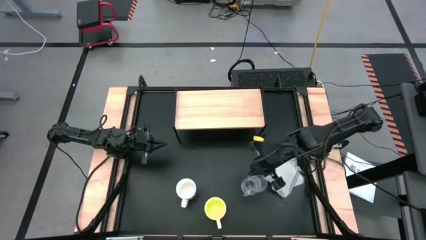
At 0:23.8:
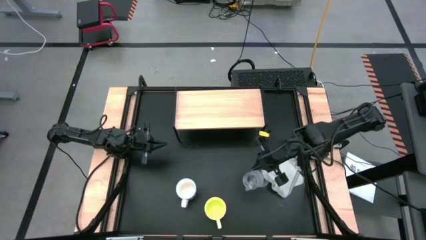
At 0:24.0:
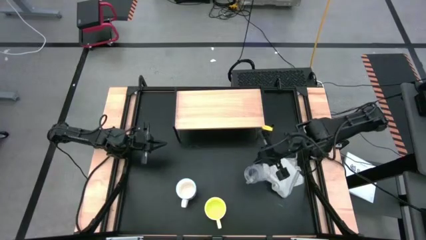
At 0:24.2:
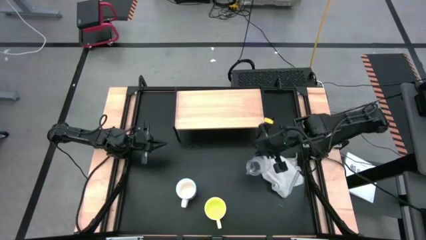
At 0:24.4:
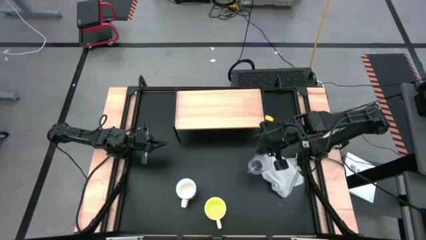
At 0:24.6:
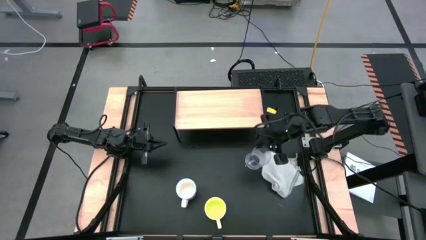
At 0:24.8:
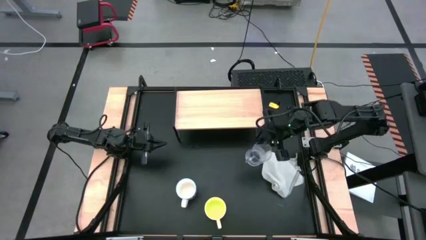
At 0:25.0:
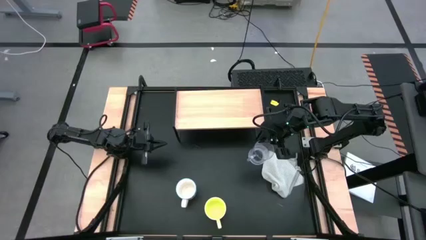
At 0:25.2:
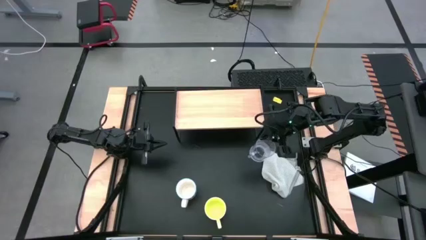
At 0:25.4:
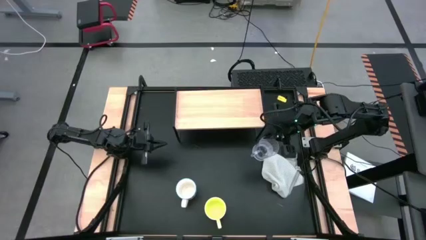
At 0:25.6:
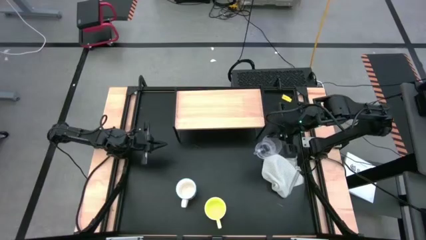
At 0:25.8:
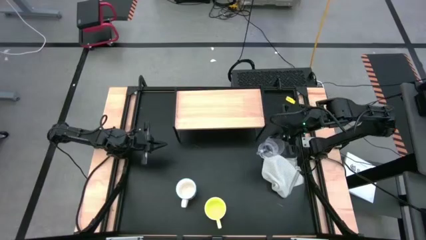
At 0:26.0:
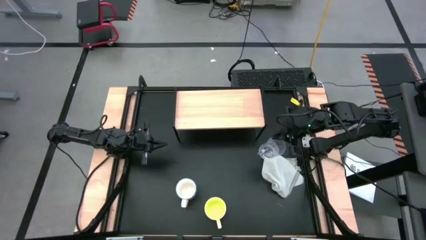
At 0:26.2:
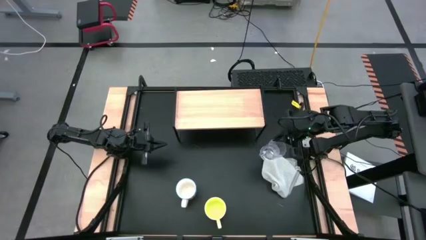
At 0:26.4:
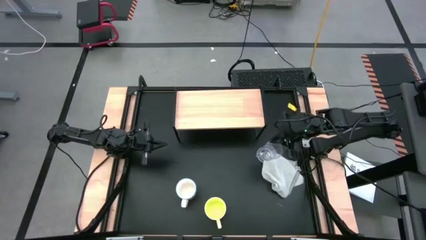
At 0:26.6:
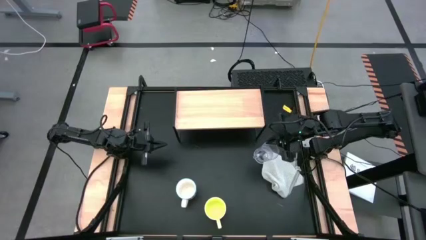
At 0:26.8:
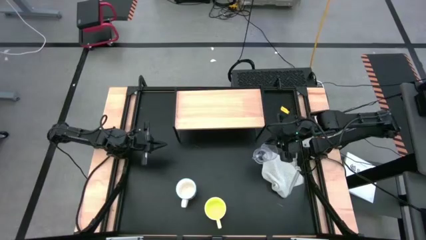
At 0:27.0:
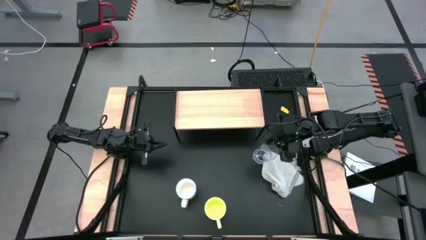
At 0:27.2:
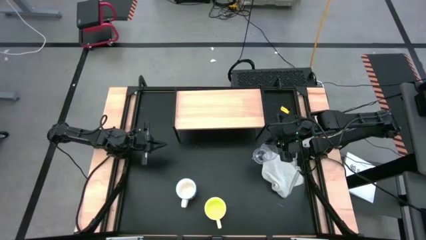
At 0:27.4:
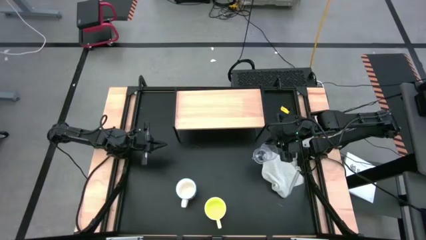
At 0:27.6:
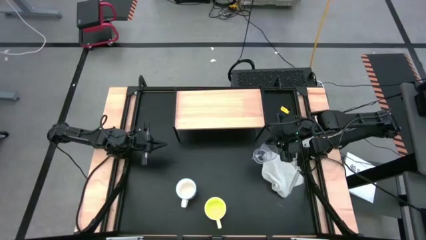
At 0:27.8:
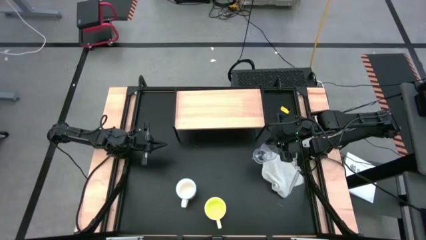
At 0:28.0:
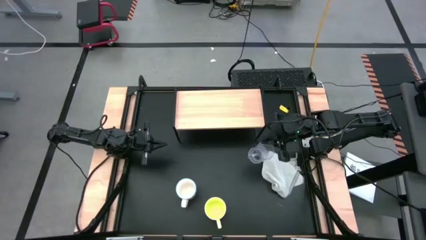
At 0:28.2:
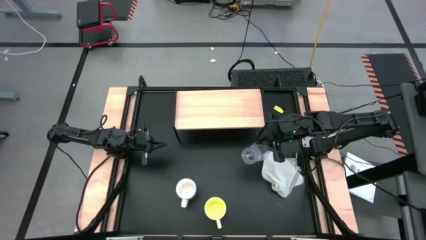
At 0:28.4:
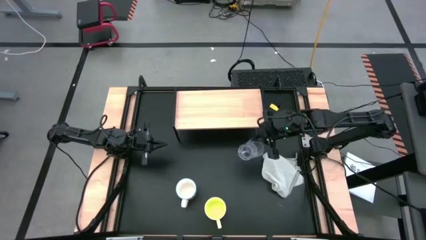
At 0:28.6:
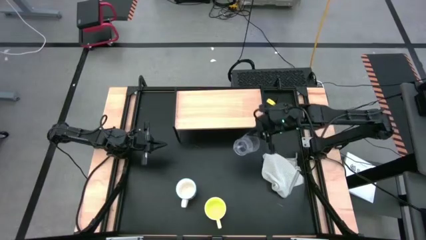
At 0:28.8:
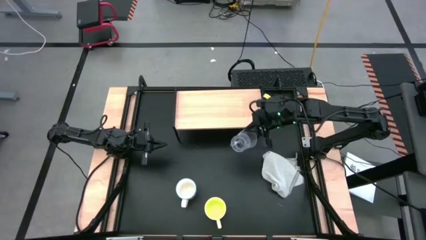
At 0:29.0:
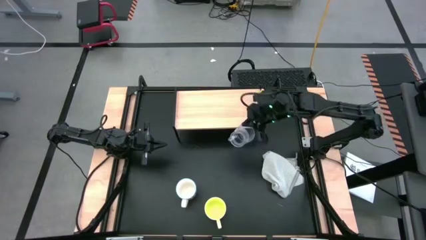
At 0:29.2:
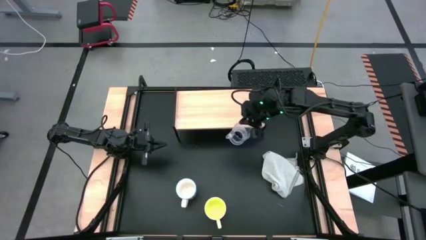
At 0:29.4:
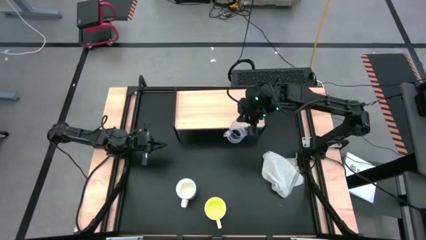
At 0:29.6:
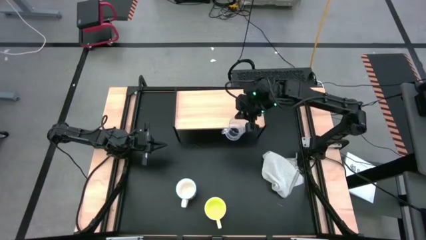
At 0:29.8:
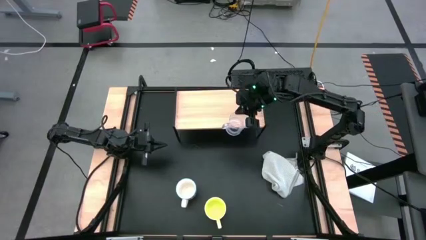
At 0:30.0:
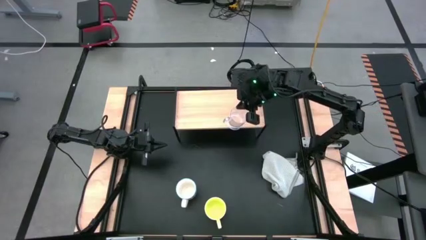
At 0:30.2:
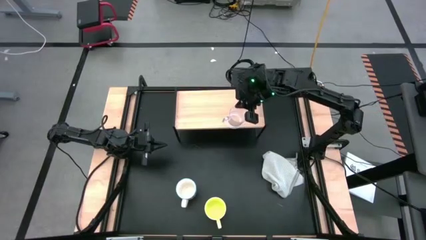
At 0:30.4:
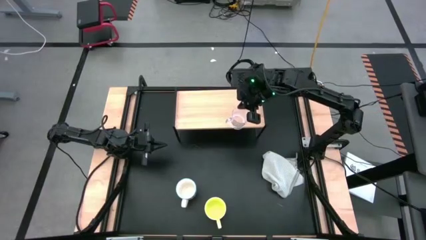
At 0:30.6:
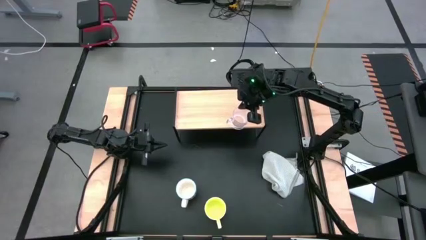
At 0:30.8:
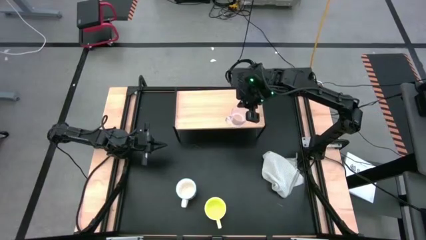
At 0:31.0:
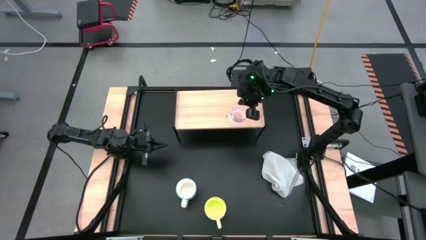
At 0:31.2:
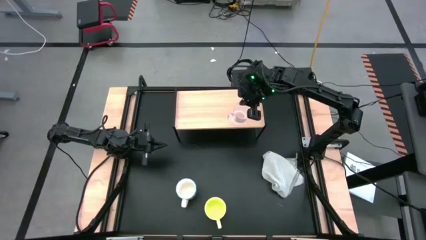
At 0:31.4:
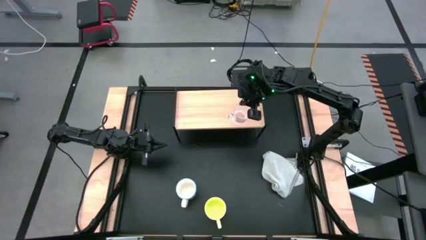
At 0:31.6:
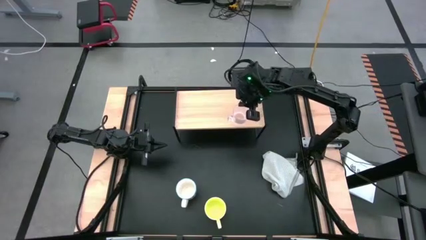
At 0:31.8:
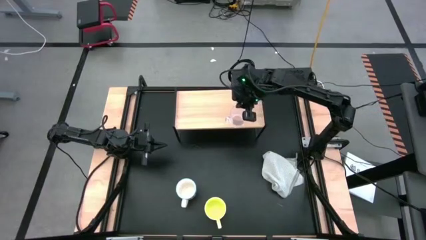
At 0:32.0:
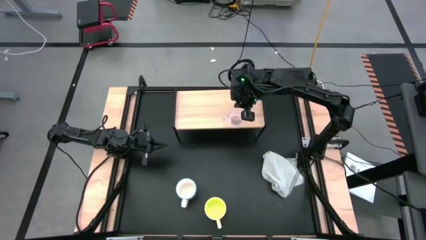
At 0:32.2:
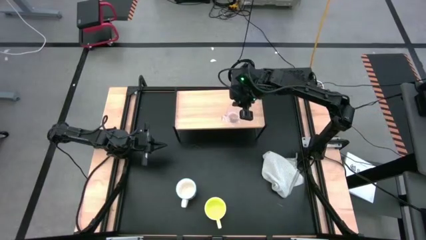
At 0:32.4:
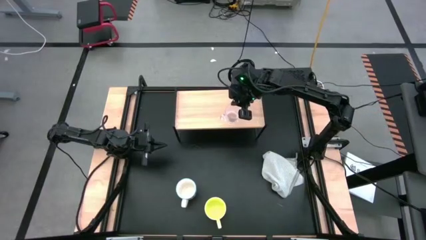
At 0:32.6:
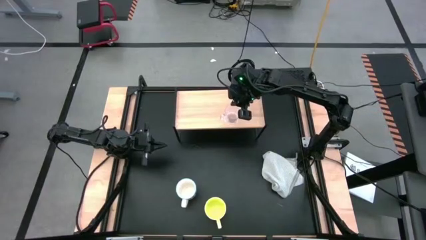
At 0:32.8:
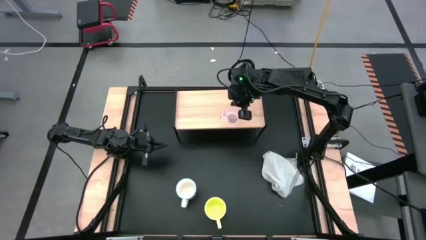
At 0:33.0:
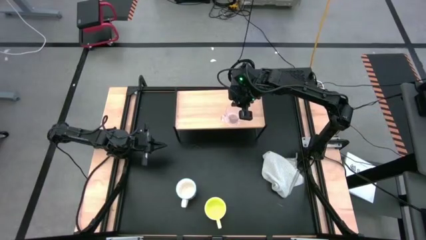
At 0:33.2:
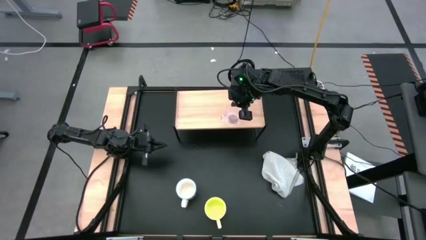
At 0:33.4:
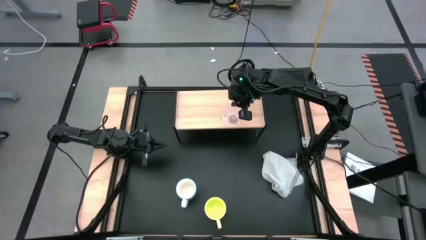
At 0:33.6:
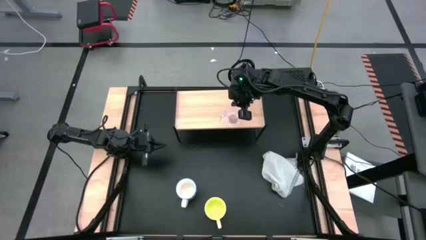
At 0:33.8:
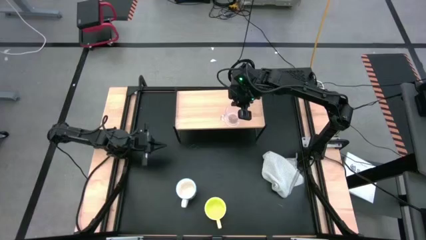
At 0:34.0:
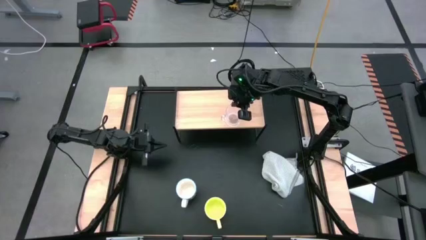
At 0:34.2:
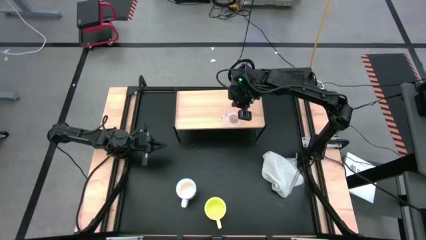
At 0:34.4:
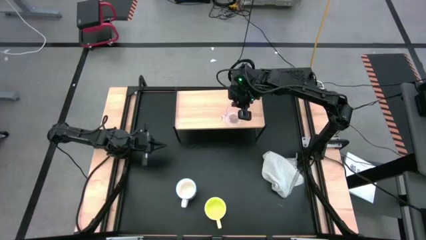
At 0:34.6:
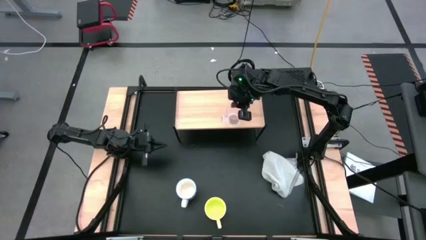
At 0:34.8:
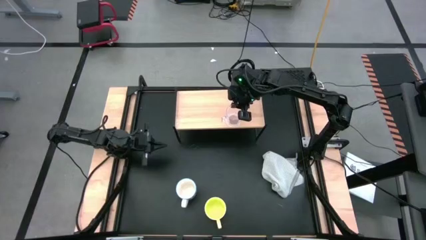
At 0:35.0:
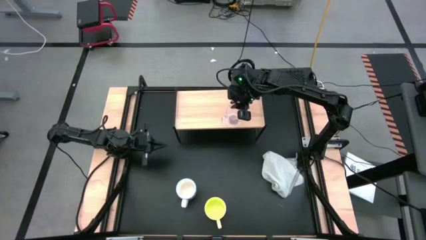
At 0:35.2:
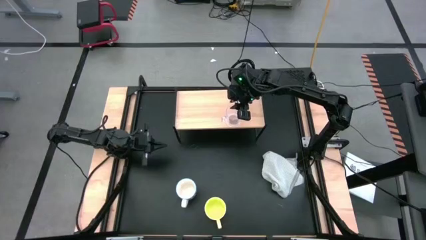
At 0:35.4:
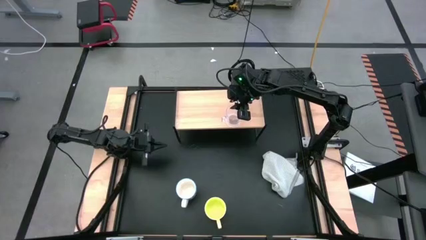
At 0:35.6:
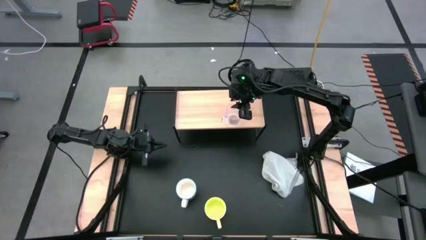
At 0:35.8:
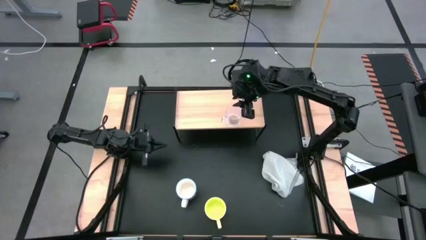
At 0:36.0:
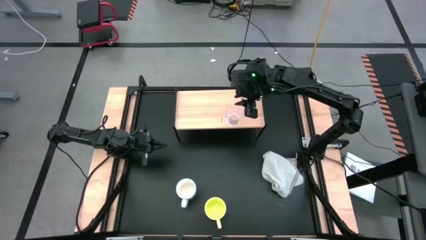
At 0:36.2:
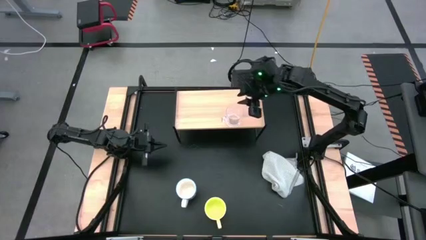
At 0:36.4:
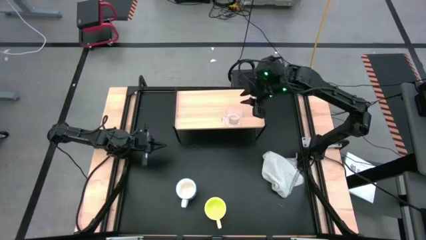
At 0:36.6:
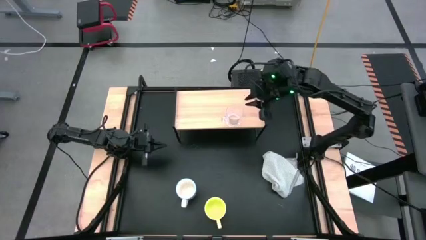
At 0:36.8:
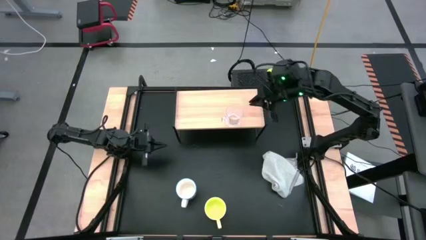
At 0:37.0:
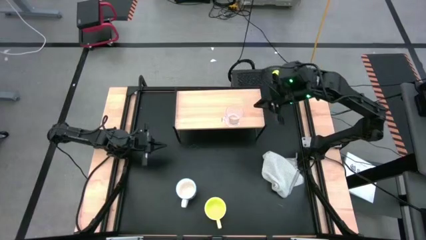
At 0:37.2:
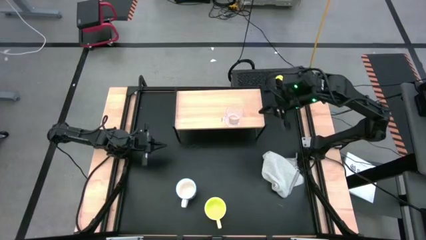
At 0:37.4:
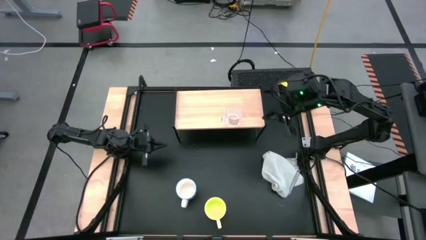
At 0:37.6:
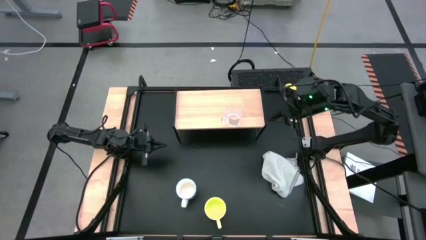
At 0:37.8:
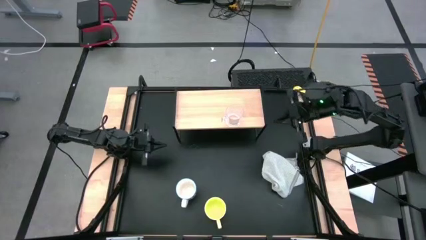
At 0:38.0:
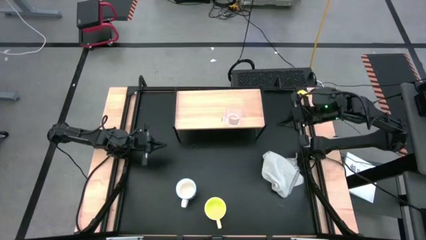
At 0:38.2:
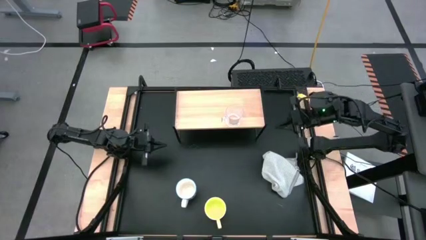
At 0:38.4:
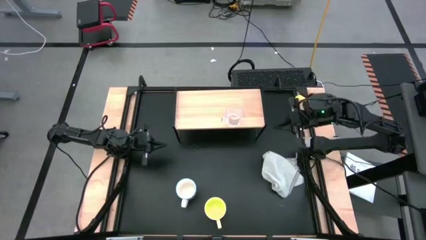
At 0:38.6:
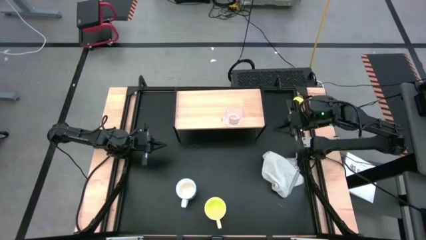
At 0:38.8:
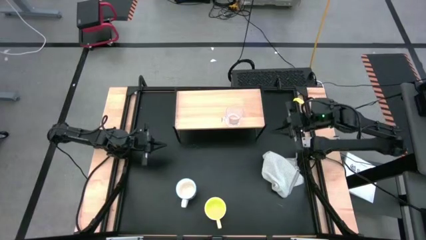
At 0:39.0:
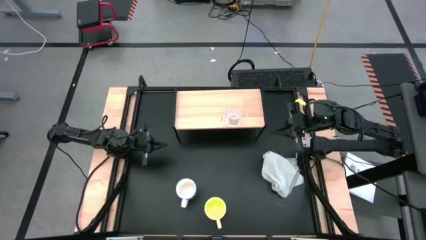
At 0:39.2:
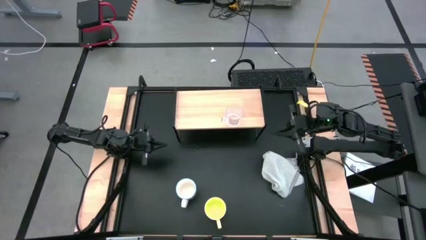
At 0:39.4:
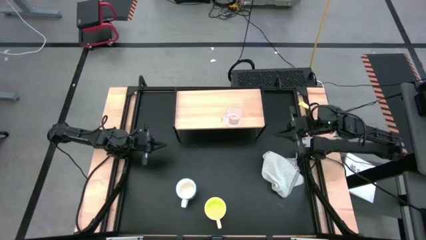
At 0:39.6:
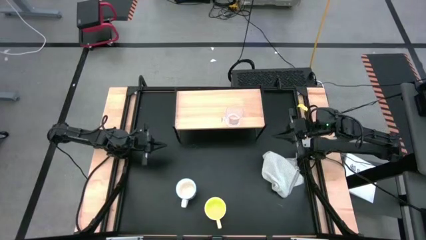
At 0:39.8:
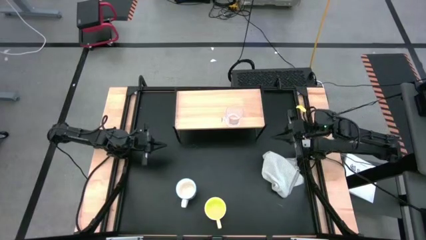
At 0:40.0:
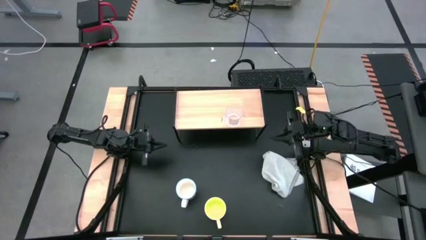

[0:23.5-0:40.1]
Task: Stack small to large cups/mugs on shelf
Put the transparent mug on the shelf
